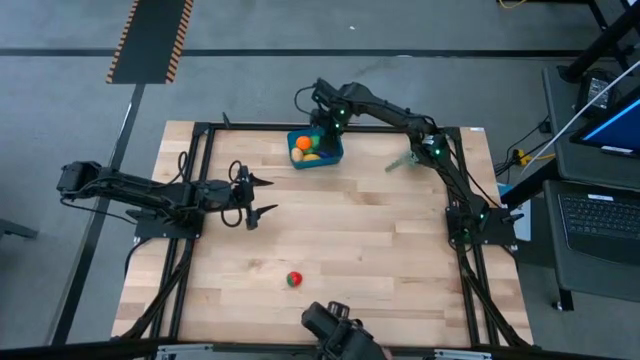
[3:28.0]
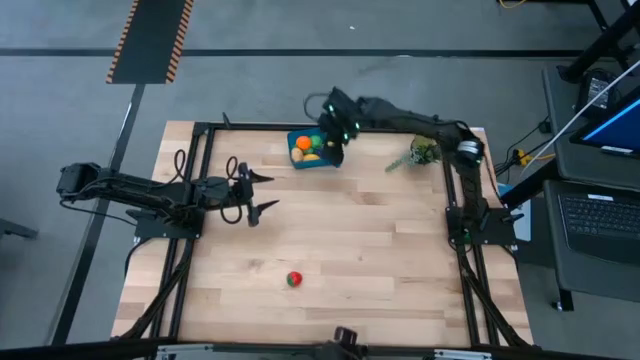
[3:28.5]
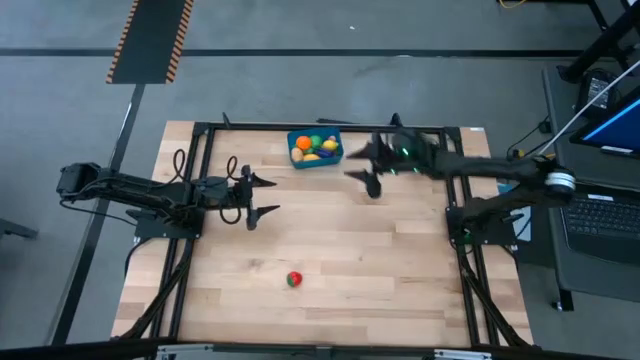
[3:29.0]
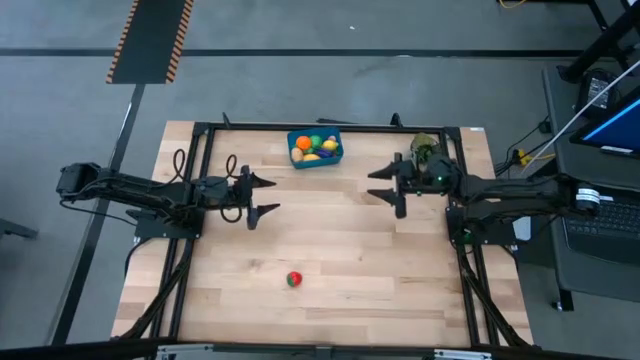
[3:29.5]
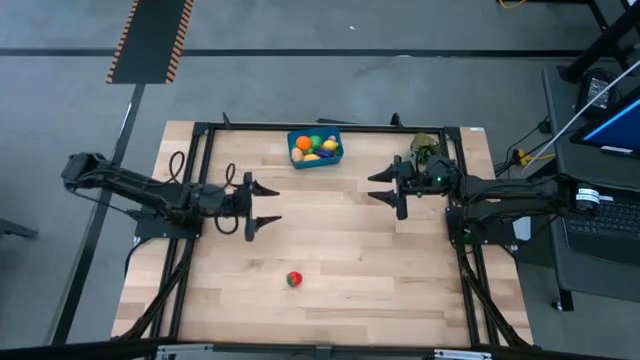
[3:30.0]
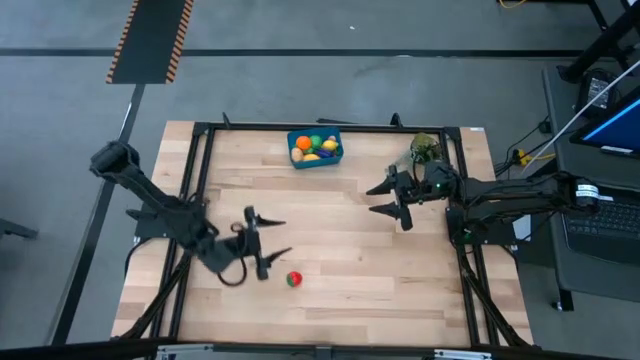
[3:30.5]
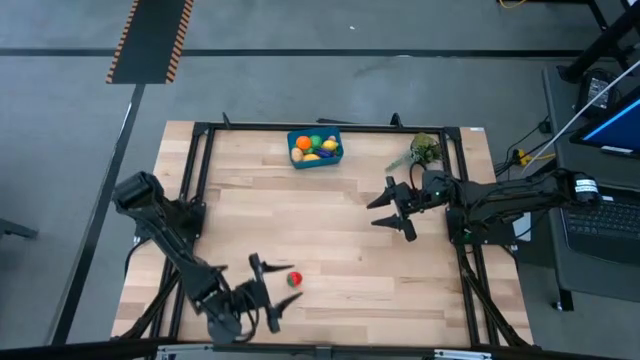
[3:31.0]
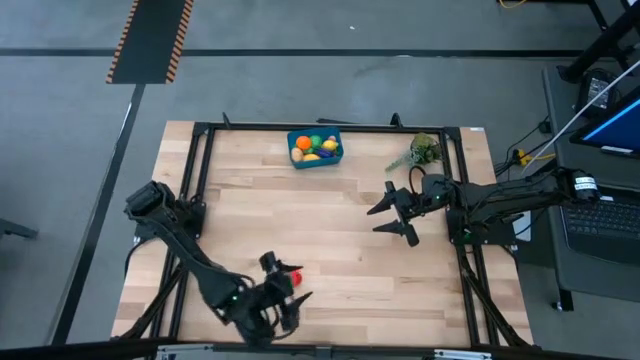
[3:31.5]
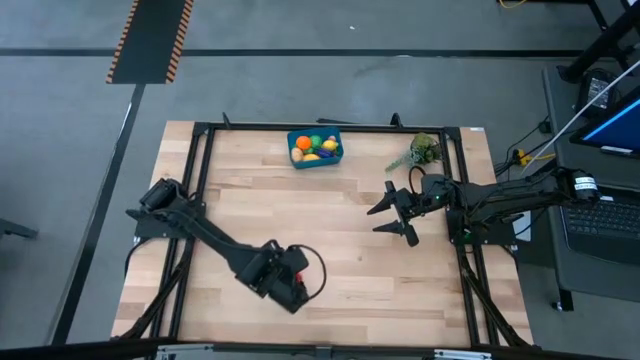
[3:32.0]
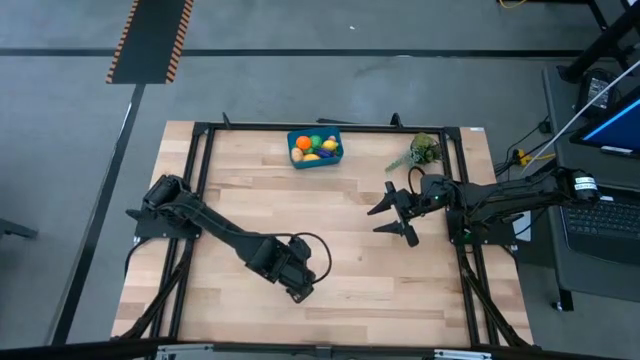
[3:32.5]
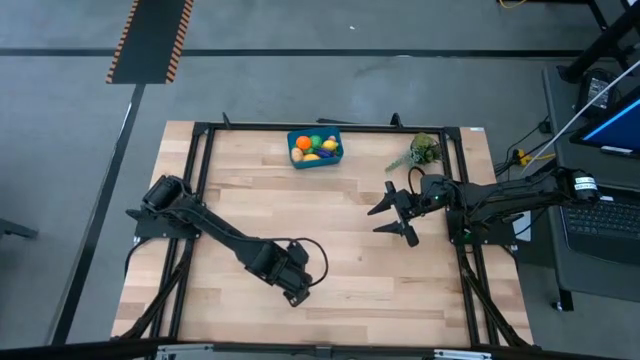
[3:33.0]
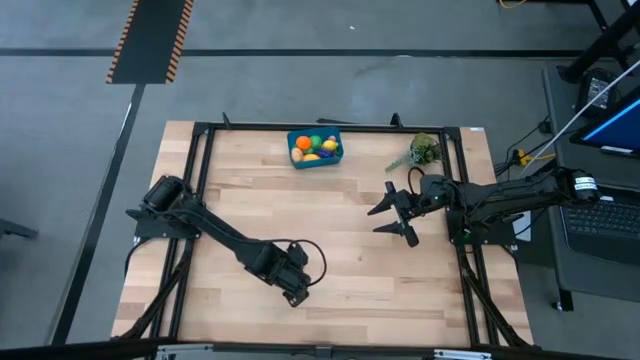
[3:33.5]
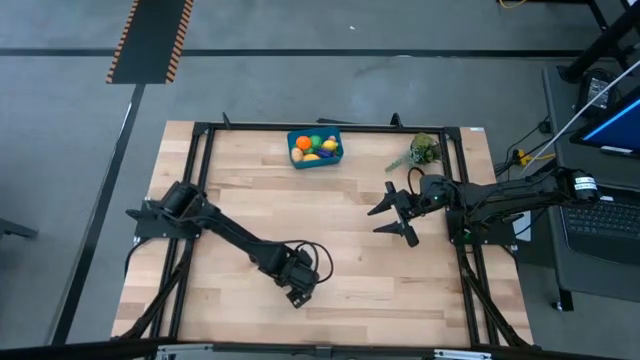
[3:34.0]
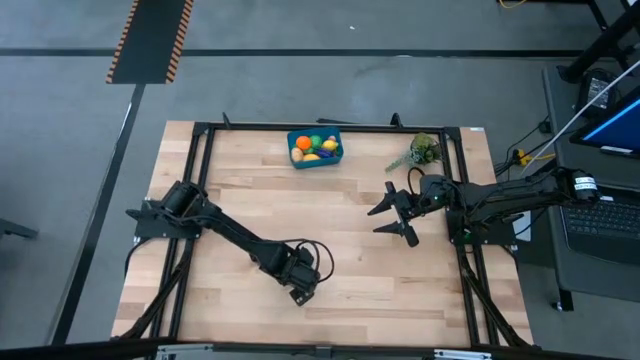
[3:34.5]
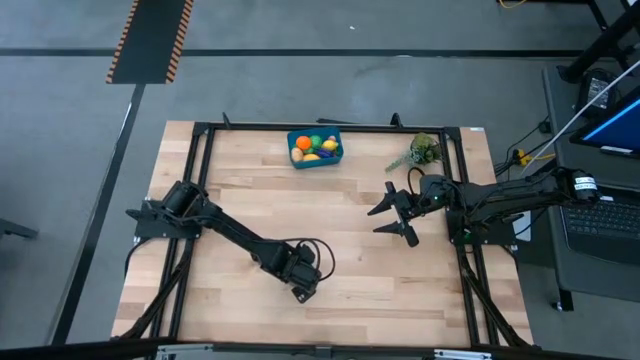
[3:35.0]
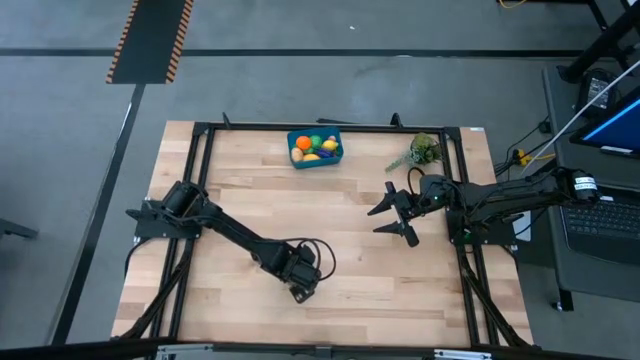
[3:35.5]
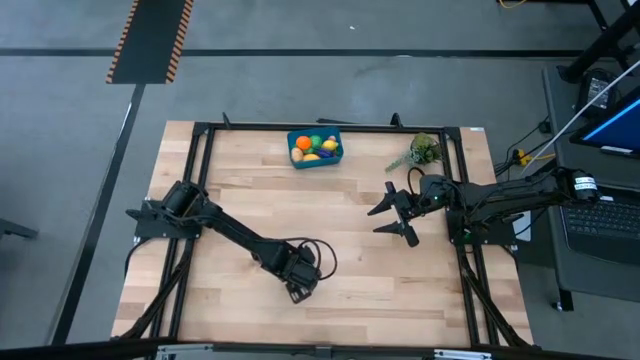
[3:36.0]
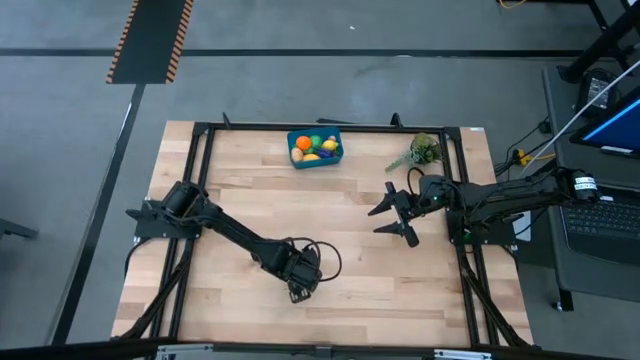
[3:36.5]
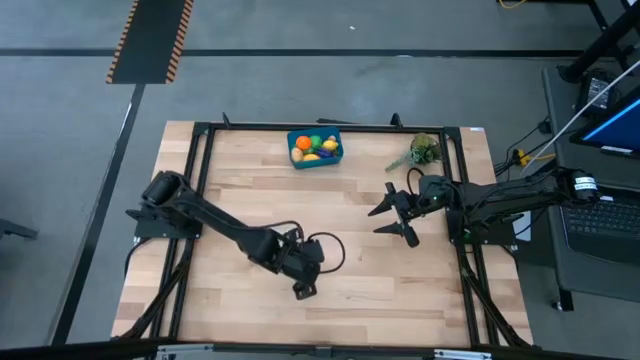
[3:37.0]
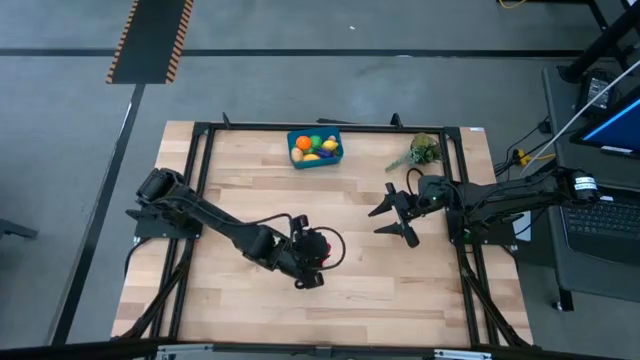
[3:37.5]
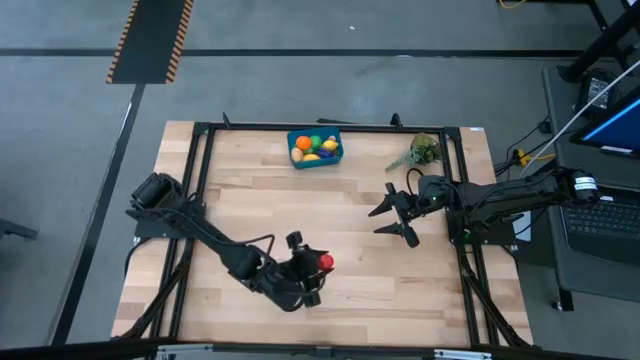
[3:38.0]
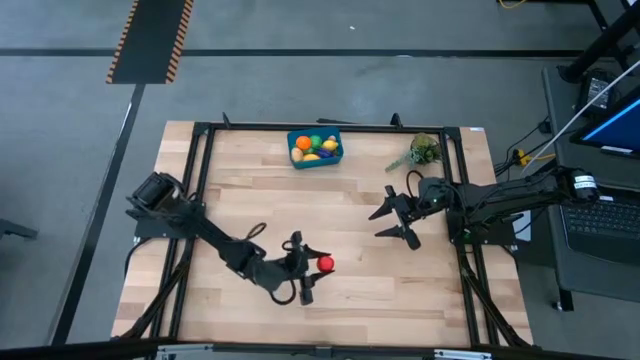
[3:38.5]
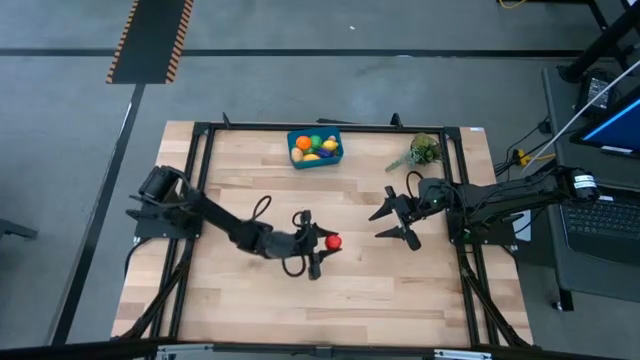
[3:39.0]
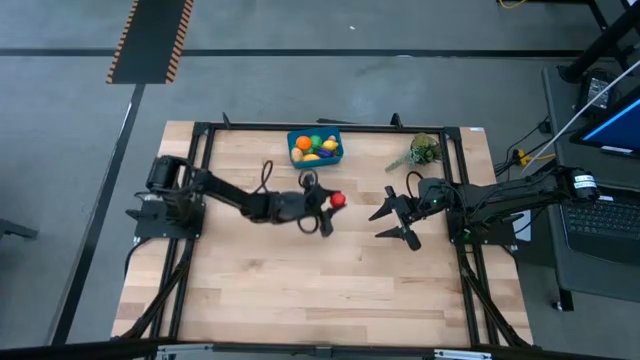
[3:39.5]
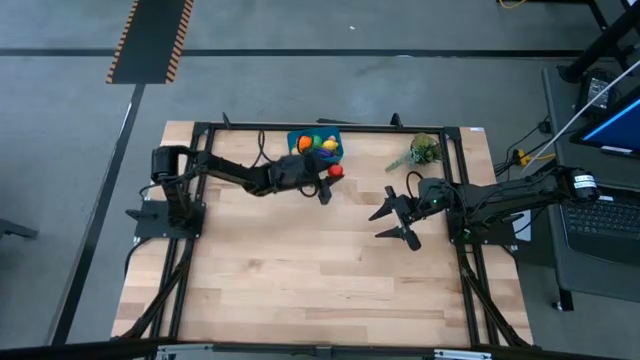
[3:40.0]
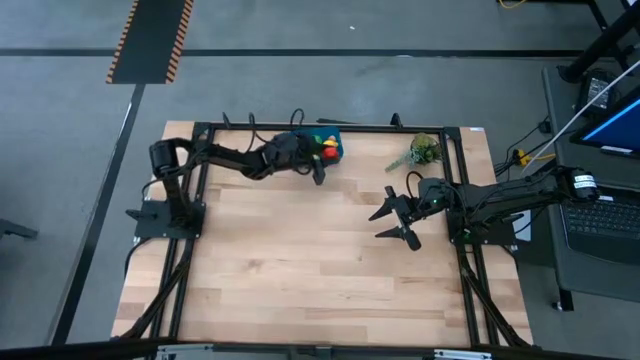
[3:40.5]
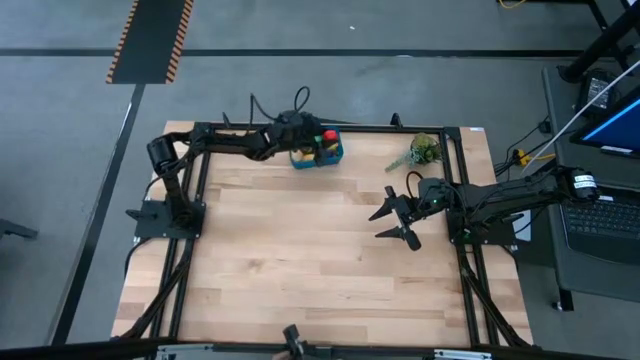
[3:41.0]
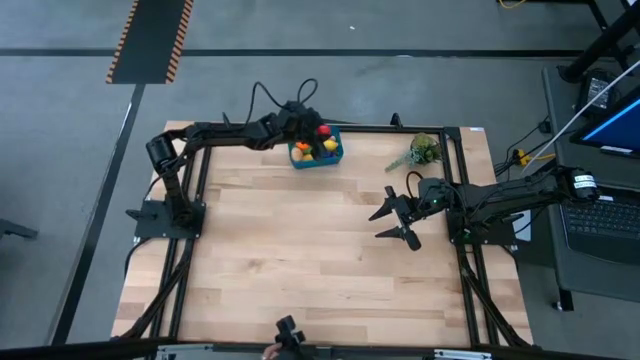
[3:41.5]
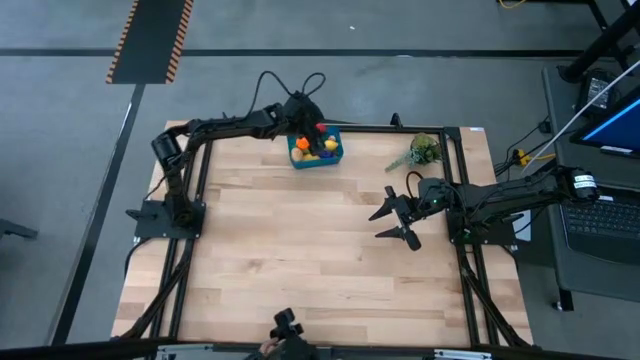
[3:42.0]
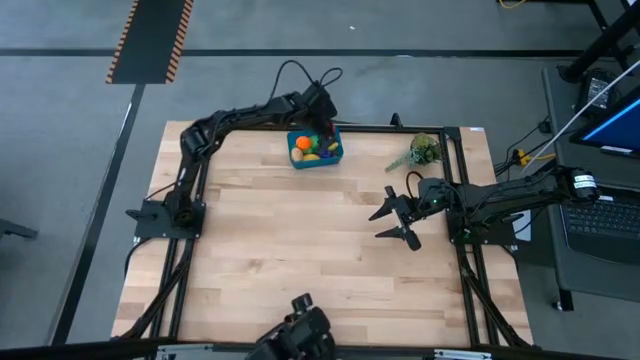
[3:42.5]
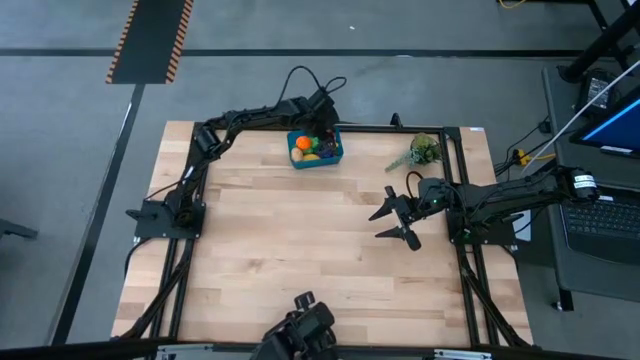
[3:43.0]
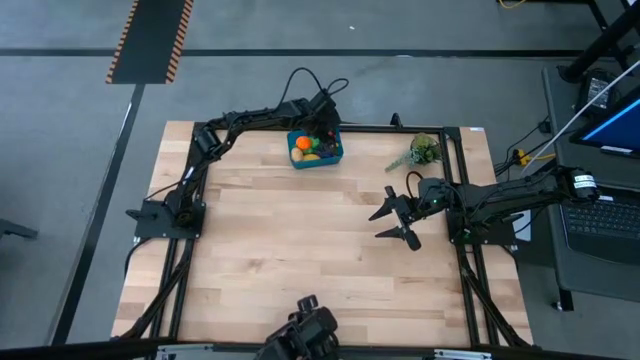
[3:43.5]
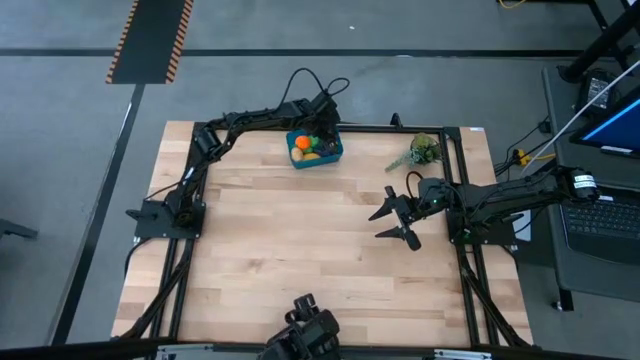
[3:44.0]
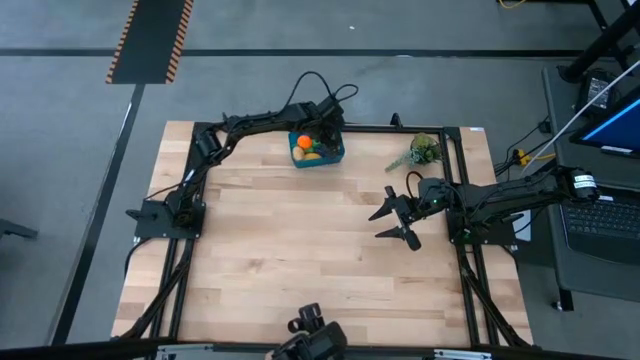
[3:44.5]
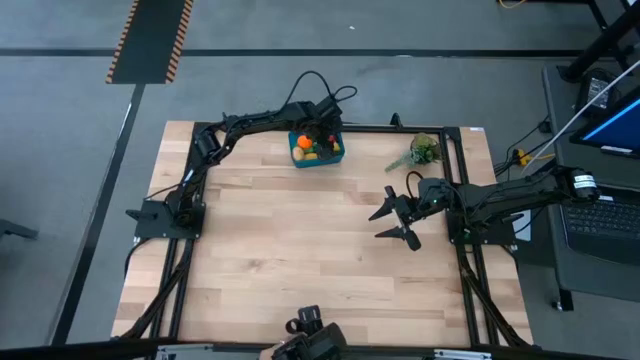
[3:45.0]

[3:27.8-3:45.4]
Task: Pick and placing Produce into tupperware
Put the strawberry into the blue bin

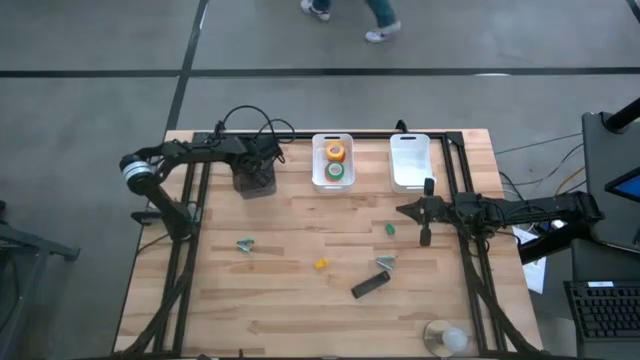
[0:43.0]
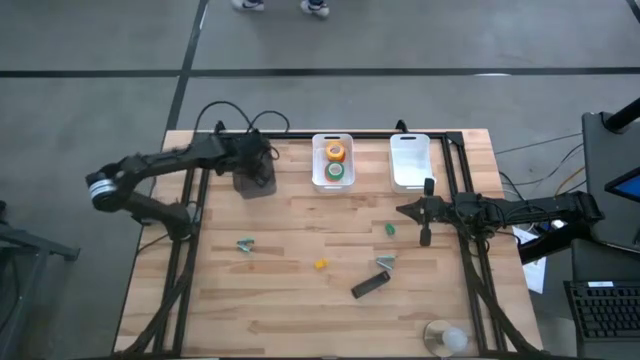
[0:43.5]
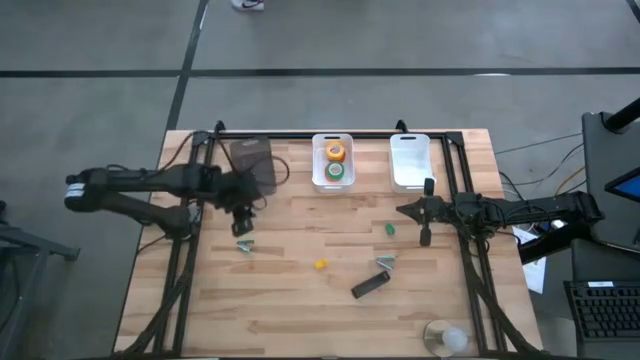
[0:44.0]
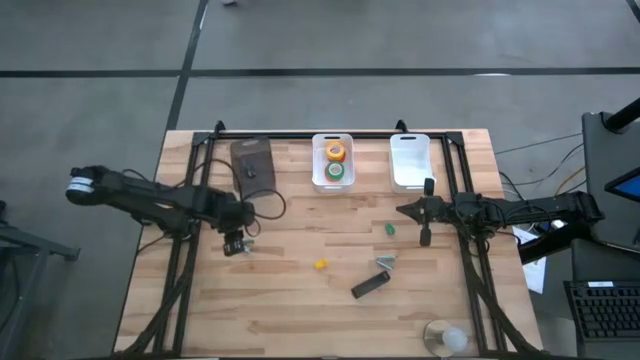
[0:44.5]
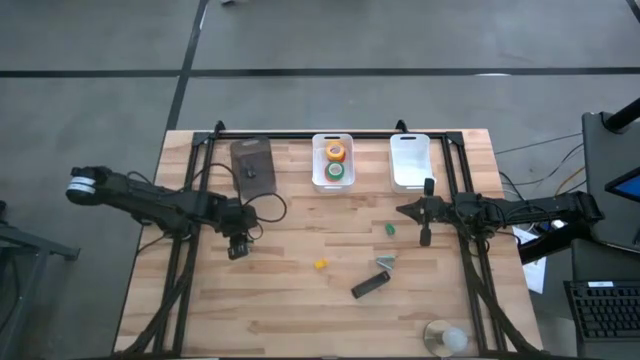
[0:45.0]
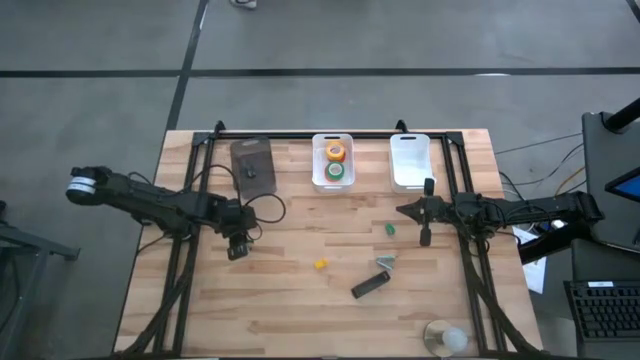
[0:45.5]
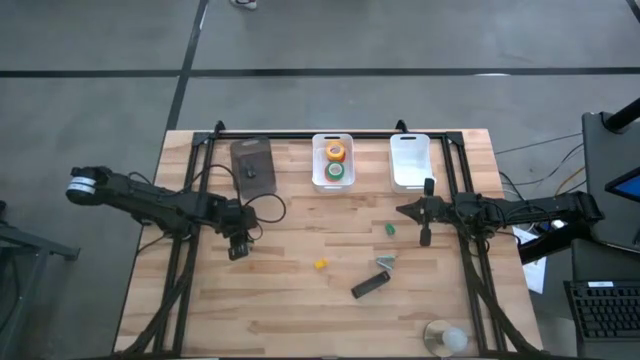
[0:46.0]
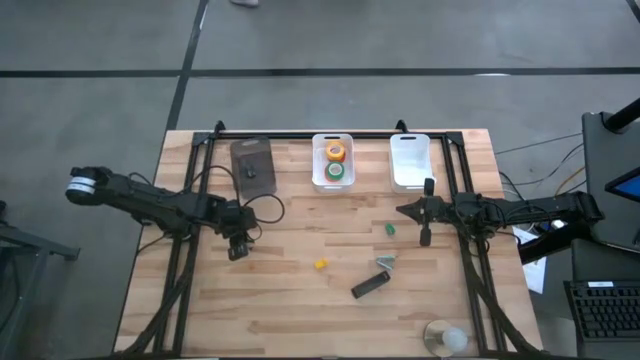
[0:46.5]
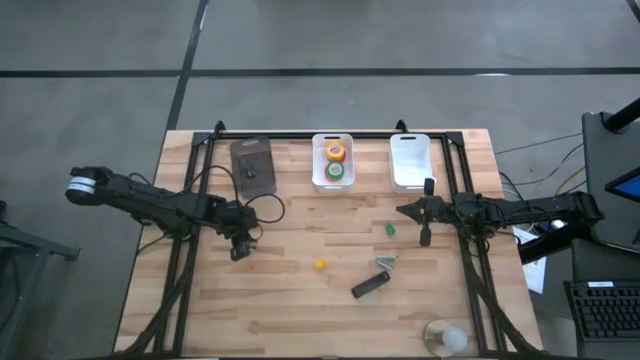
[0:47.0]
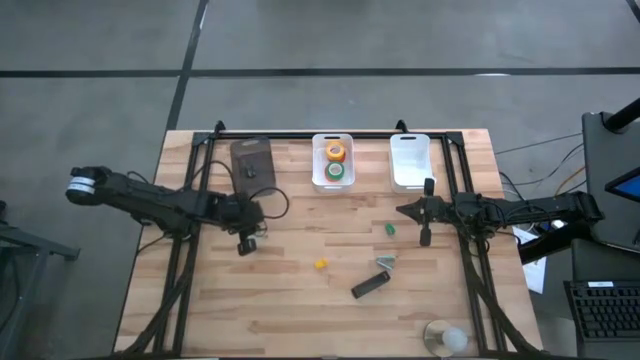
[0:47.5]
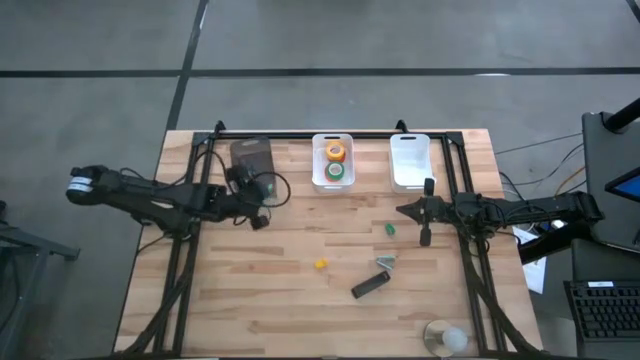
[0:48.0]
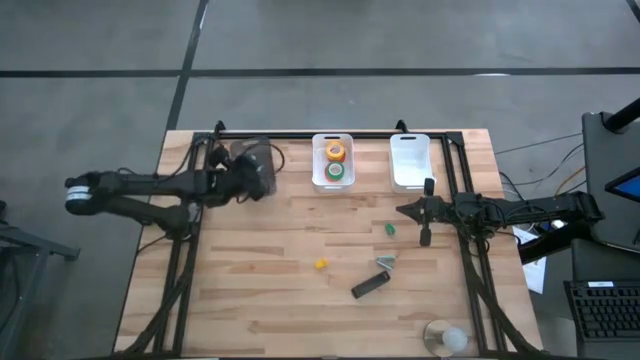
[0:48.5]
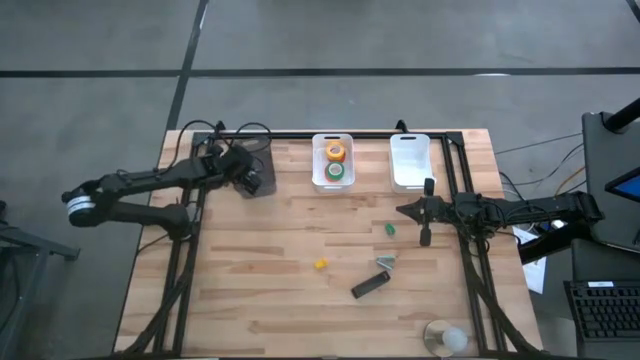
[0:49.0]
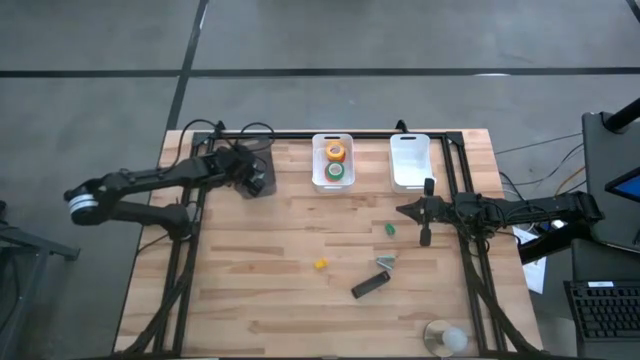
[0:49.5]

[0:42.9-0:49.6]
Task: Pick and place Stapler, Stapler remover, tape
Put the left light blue staple remover into the black bin
